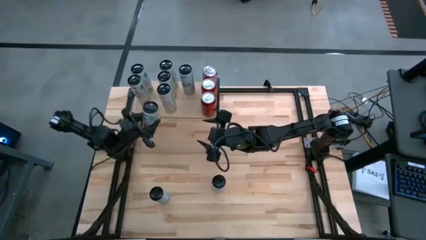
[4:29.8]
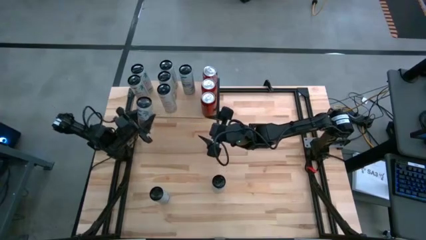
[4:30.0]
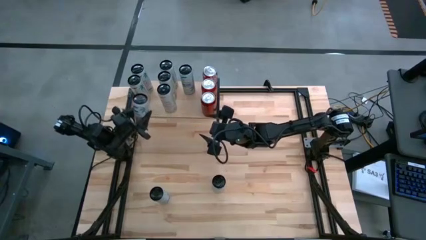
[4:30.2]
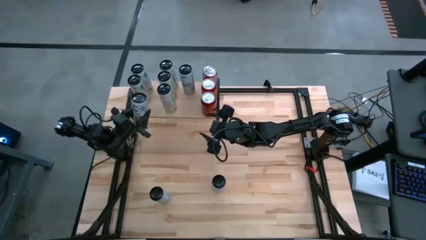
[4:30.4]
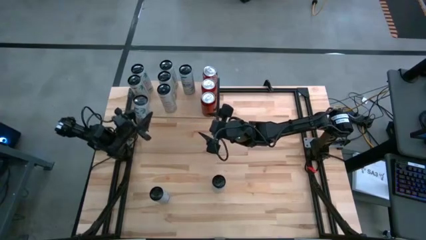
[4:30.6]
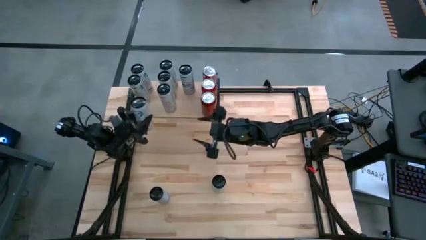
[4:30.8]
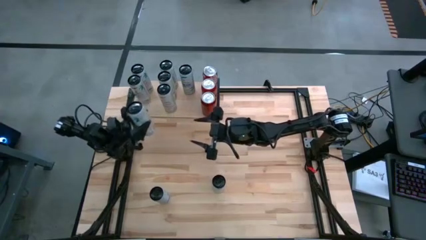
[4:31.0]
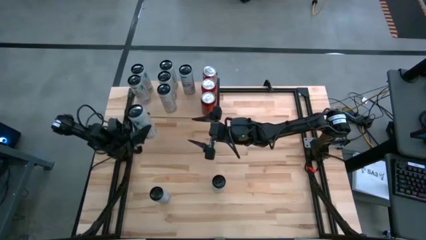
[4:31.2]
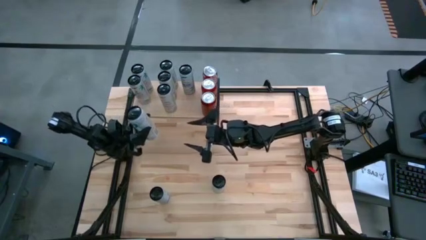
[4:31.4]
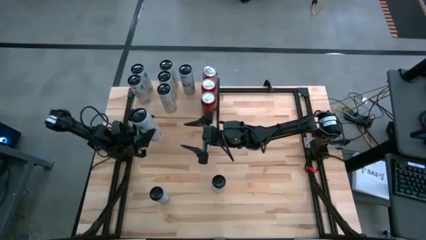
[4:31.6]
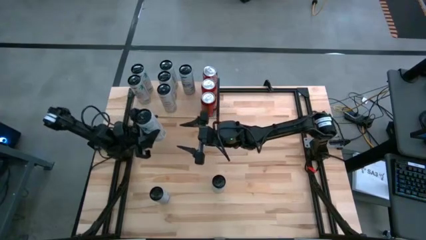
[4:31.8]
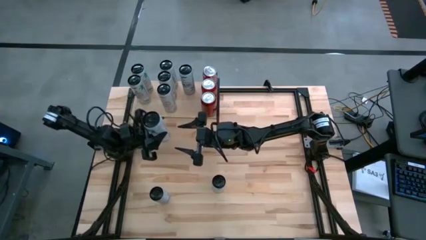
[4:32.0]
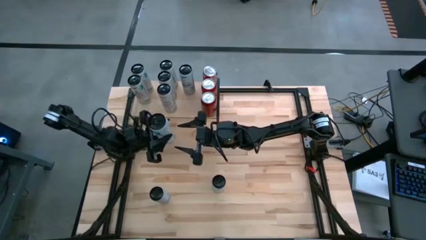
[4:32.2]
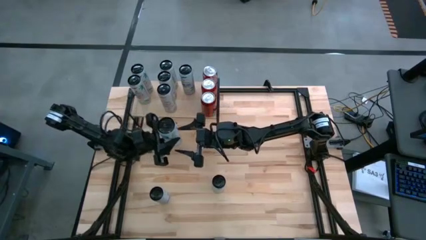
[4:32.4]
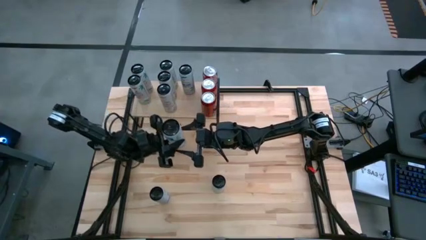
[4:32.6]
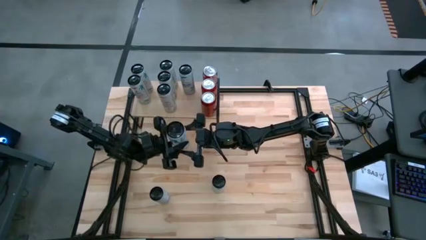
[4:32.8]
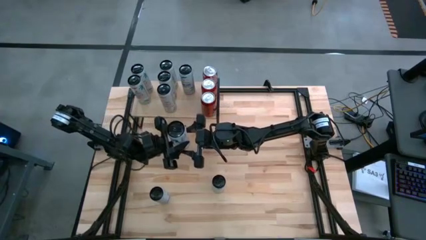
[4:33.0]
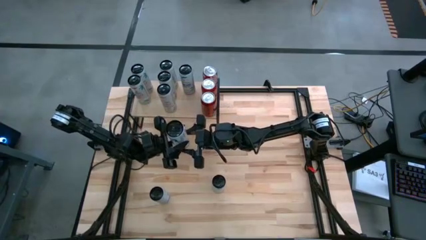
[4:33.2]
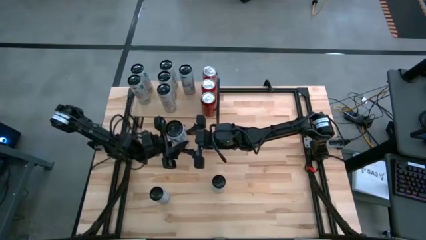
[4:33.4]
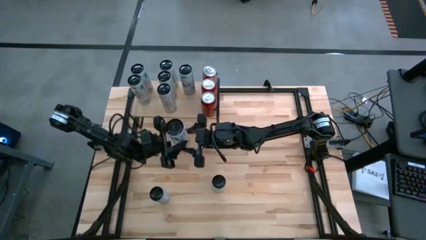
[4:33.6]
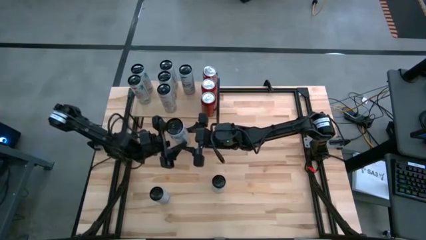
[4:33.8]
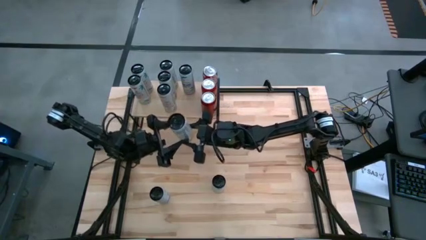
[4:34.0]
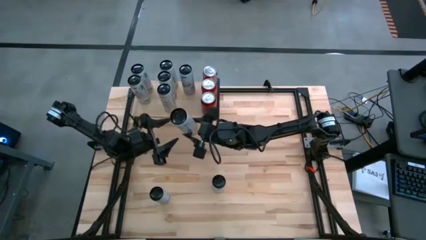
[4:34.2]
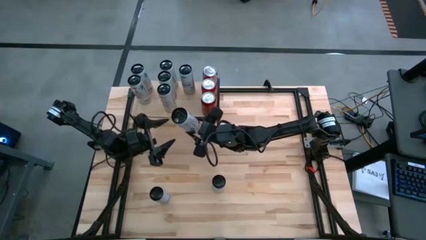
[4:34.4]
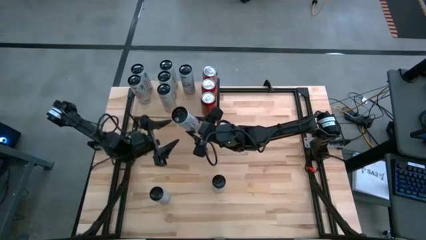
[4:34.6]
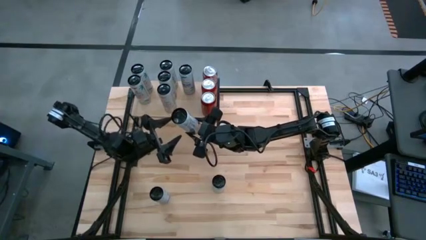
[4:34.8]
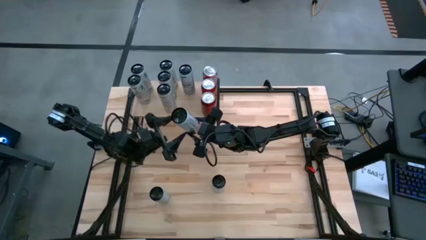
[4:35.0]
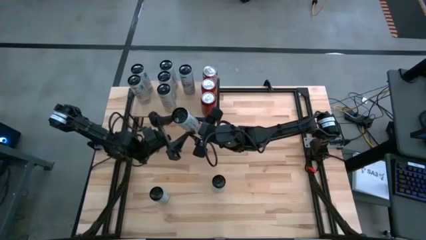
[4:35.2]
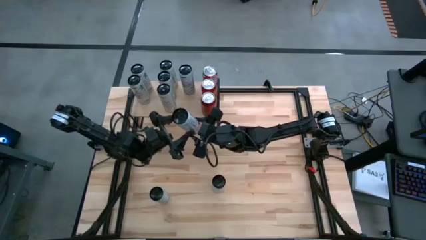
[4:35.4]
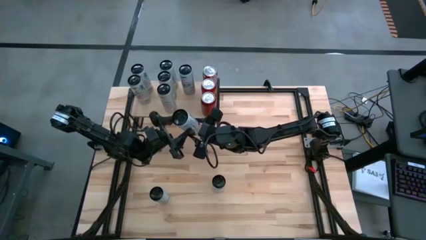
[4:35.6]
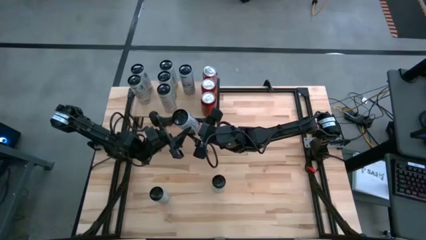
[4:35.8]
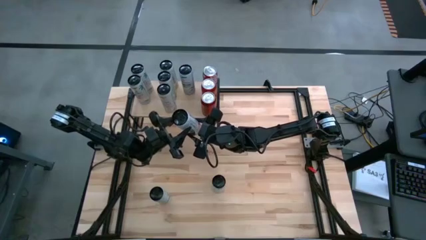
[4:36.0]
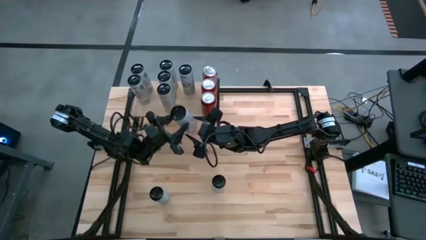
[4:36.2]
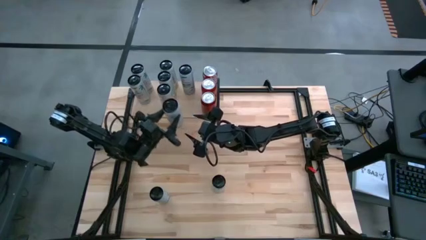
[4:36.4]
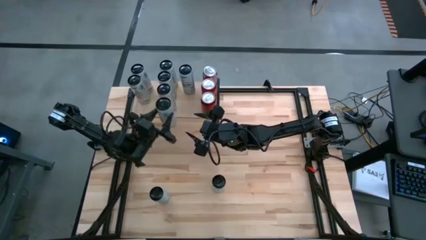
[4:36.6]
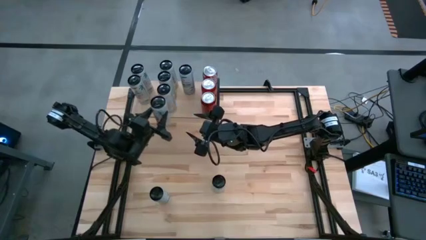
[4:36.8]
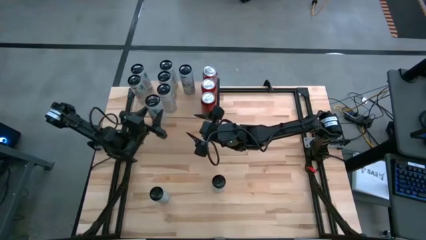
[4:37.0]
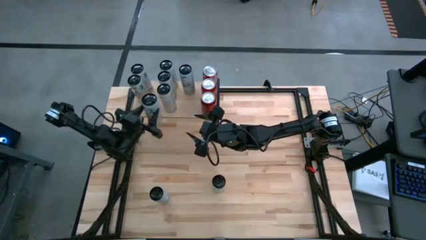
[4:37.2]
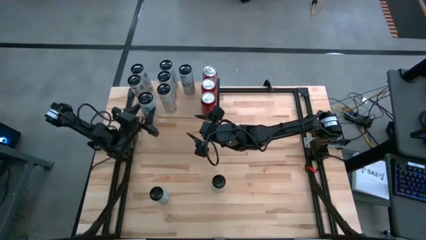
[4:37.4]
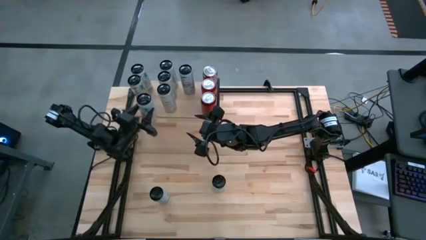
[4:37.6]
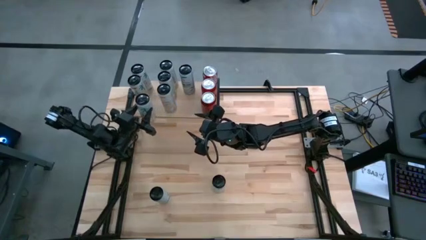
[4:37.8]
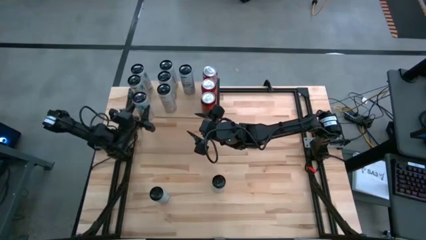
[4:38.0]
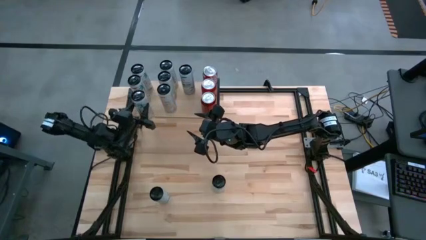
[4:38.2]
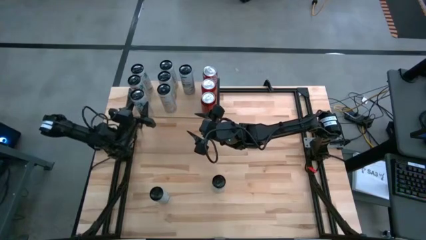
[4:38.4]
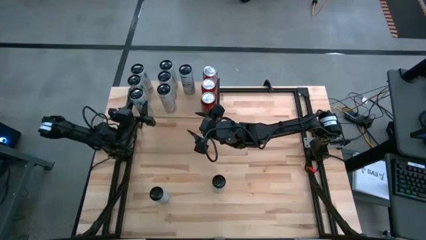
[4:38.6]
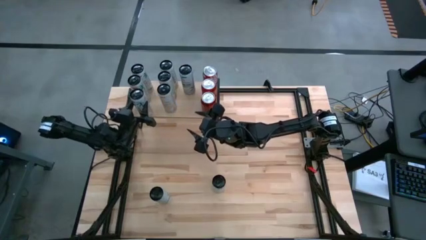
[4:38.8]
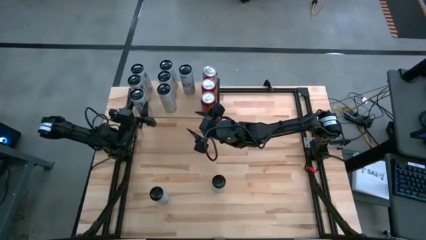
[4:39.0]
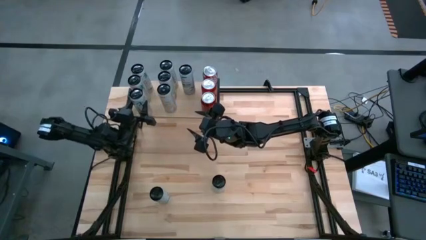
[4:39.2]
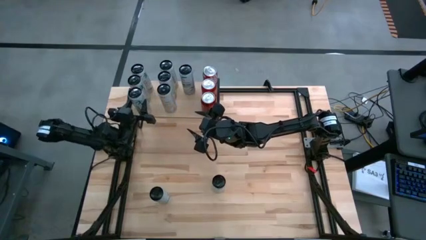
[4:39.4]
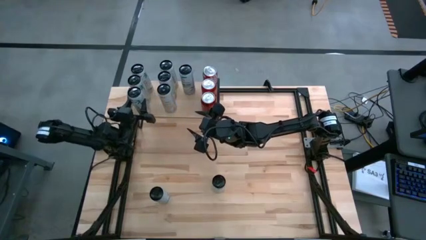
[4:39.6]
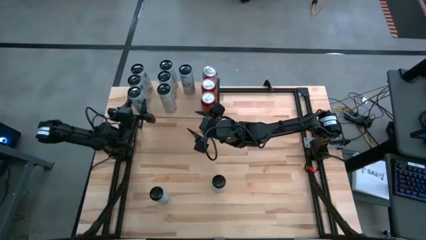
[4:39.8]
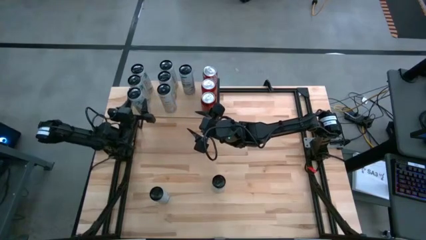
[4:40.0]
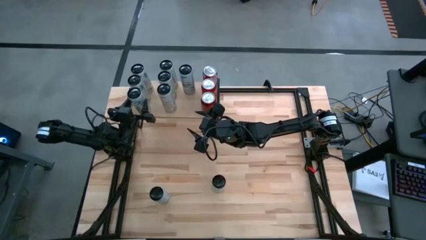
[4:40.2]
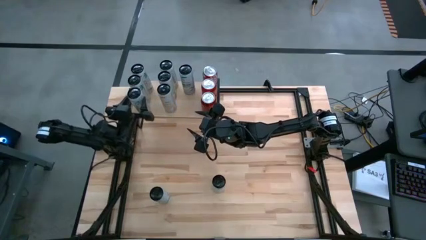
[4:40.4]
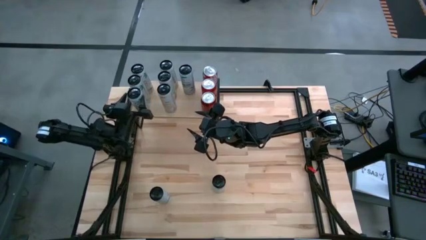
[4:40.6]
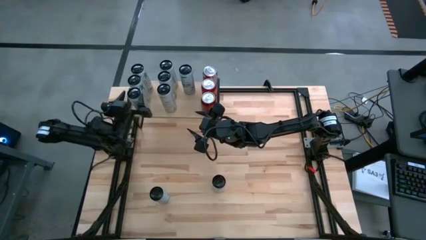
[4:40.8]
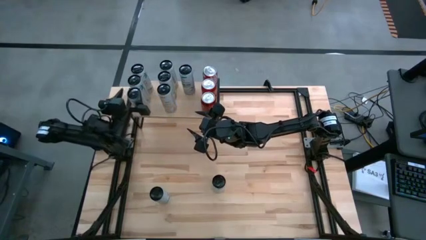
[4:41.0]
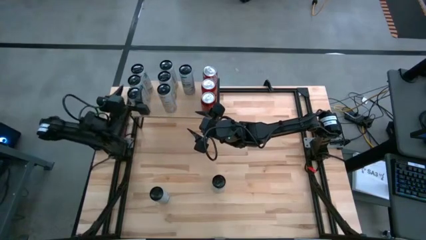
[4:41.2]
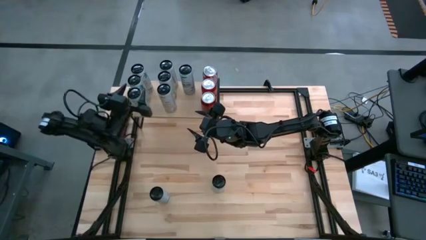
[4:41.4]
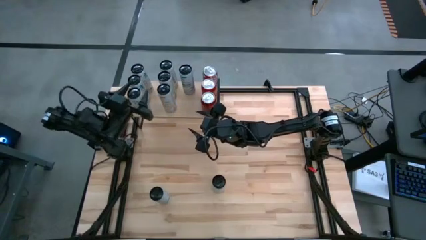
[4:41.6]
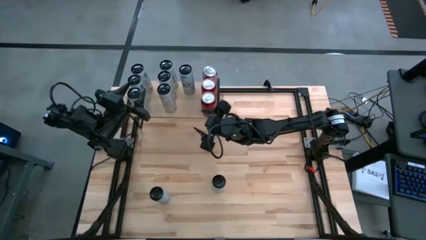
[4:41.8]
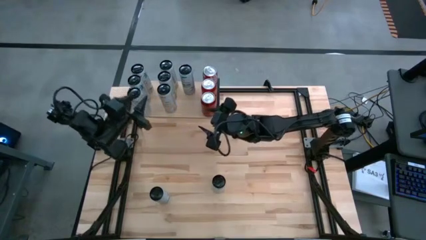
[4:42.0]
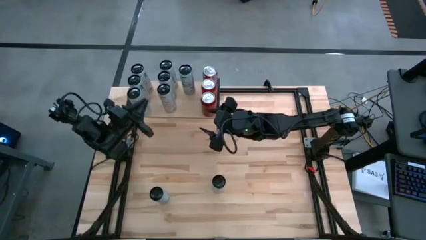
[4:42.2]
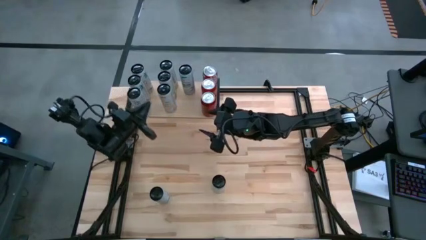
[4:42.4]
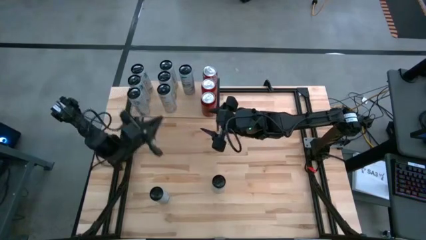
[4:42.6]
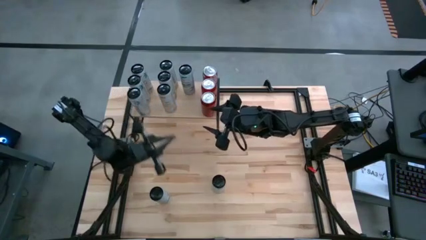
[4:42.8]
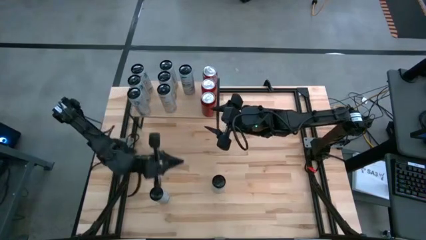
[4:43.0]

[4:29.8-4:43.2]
Task: Place canned beverage on shelf
Put the white pink soda can on the shelf aligned with the other white pink soda cans

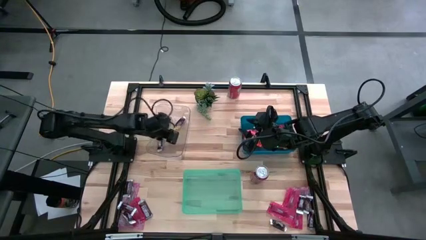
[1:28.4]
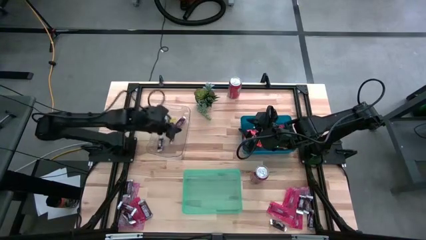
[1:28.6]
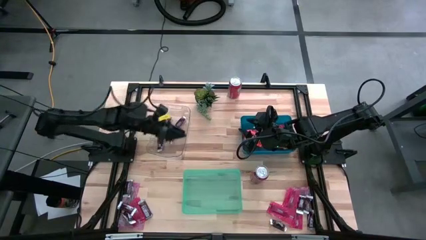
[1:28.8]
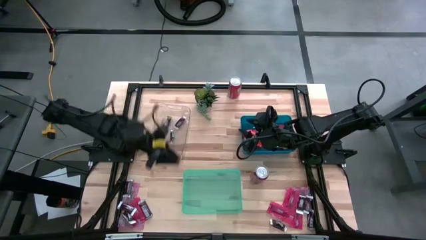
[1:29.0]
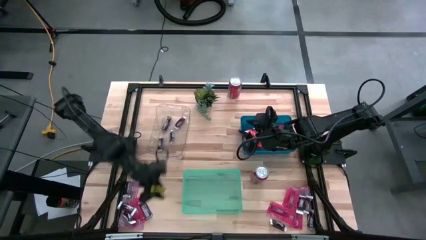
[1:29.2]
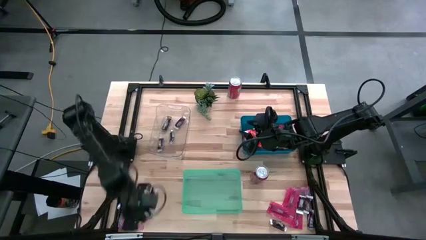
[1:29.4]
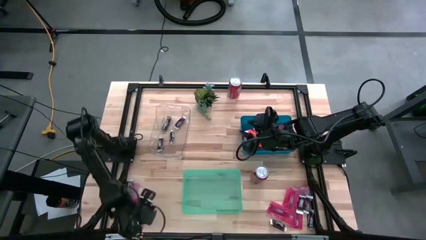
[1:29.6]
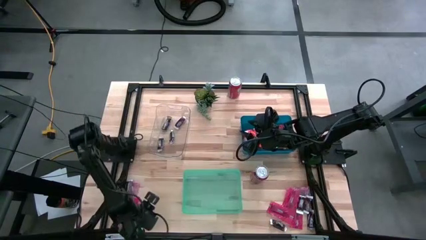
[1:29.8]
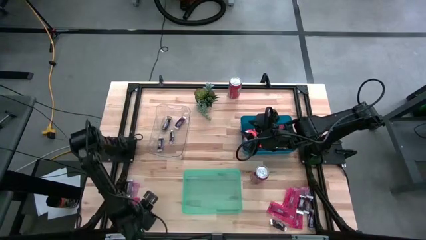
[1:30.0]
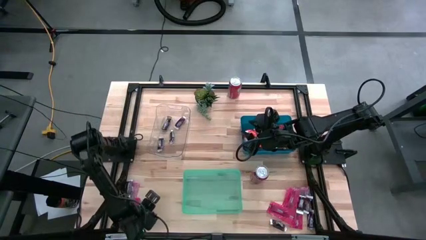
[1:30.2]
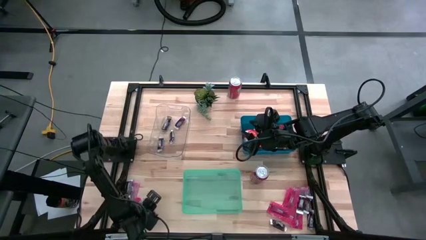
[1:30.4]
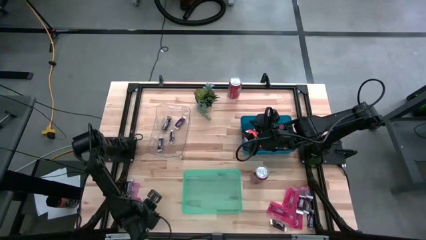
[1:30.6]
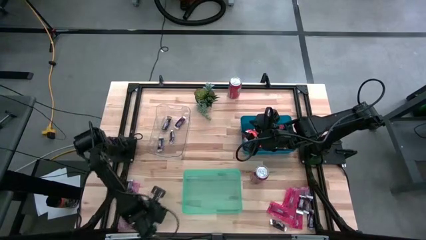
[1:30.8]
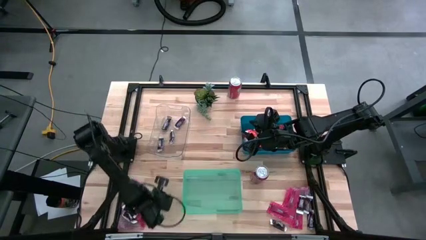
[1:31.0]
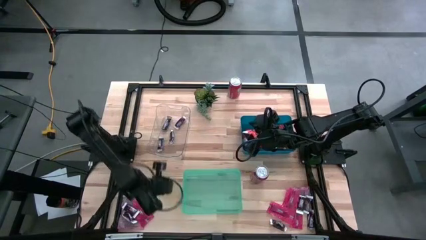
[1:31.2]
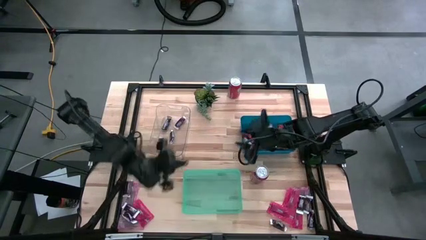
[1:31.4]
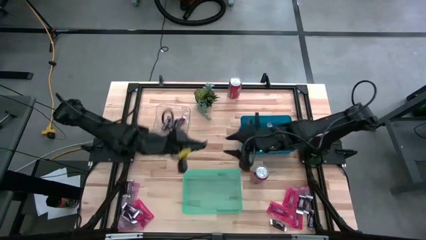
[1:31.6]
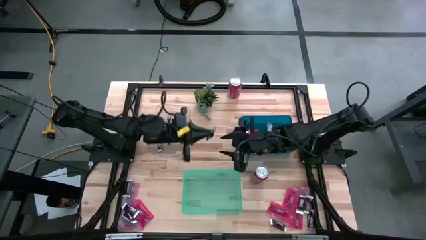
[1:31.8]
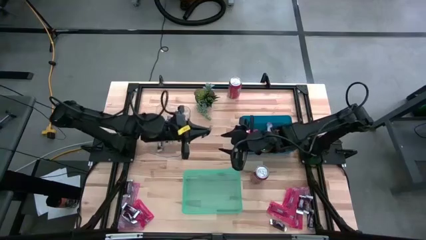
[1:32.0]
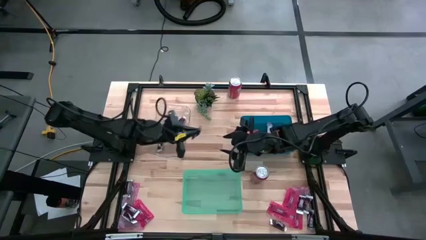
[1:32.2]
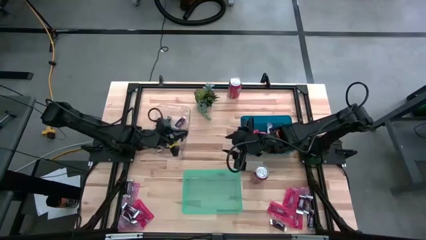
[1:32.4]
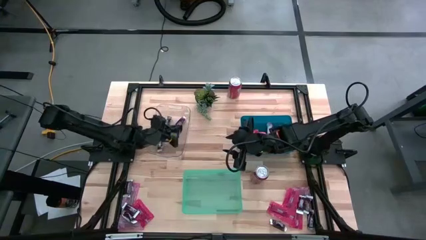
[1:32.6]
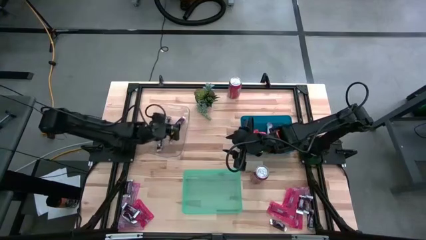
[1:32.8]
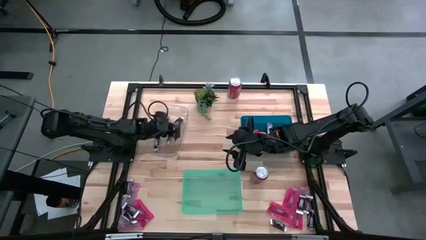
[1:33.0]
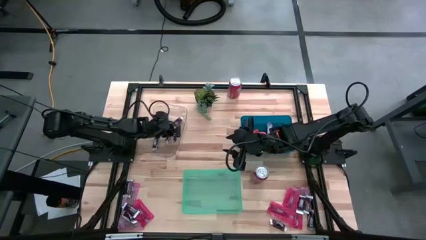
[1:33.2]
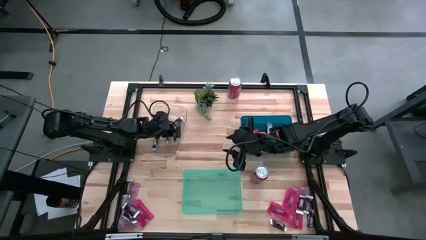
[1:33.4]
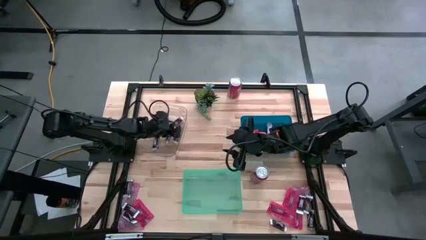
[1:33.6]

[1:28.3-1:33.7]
Task: Sort candy
Put the brown chocolate bar into the transparent bin
